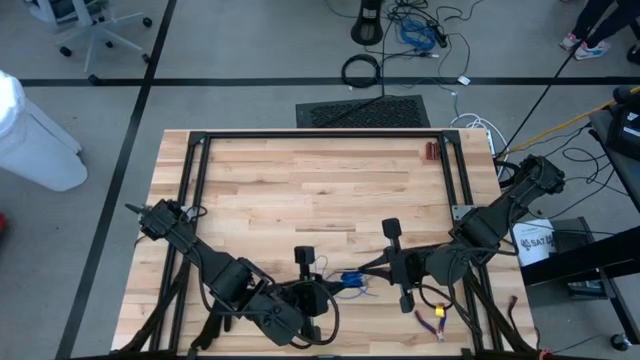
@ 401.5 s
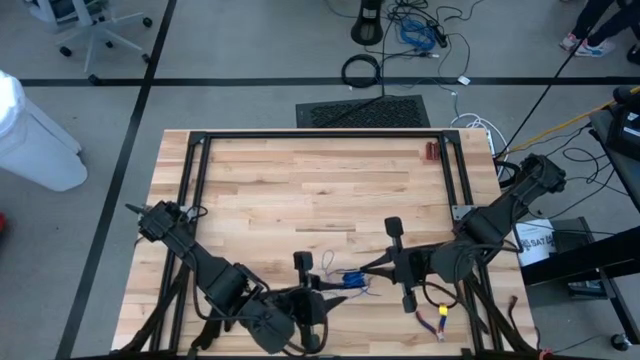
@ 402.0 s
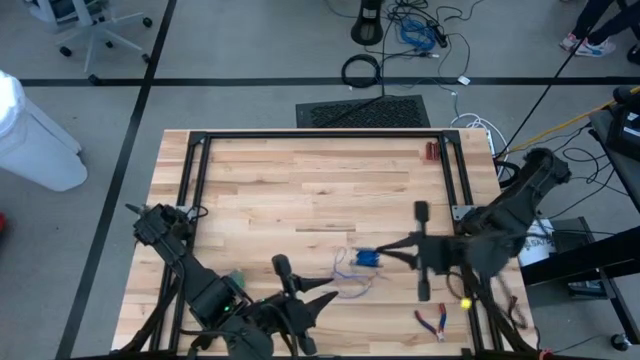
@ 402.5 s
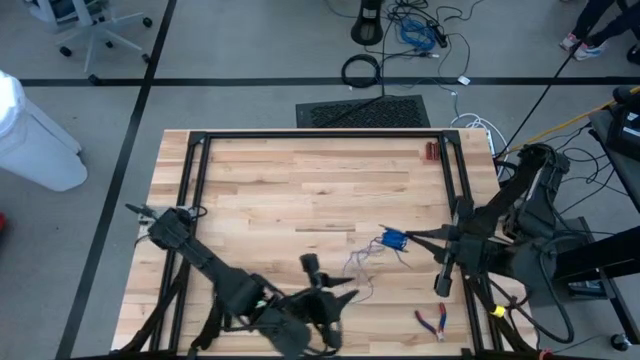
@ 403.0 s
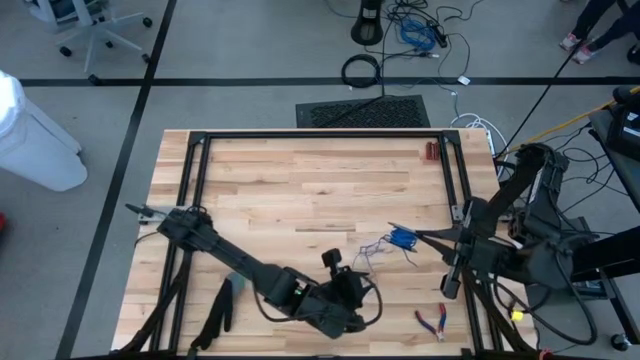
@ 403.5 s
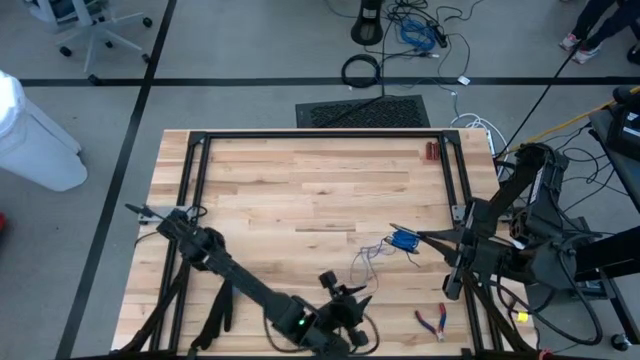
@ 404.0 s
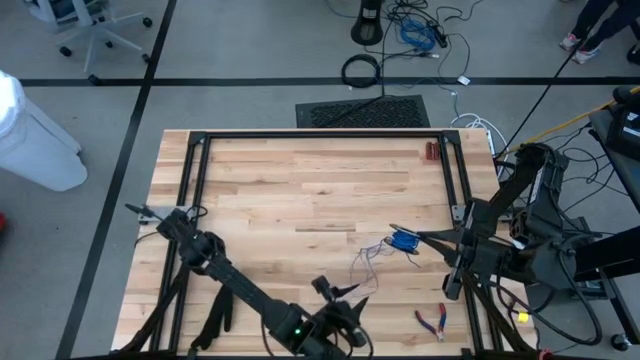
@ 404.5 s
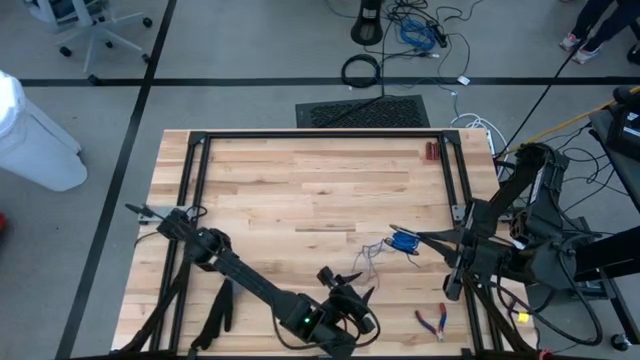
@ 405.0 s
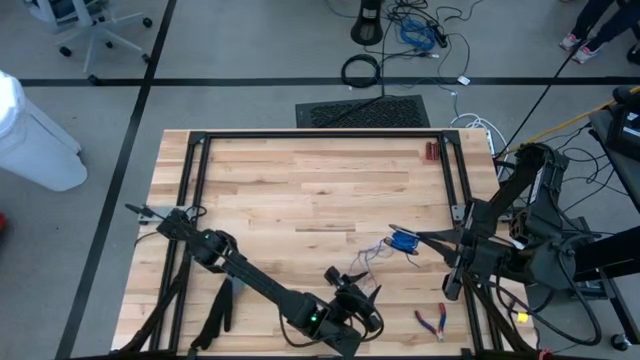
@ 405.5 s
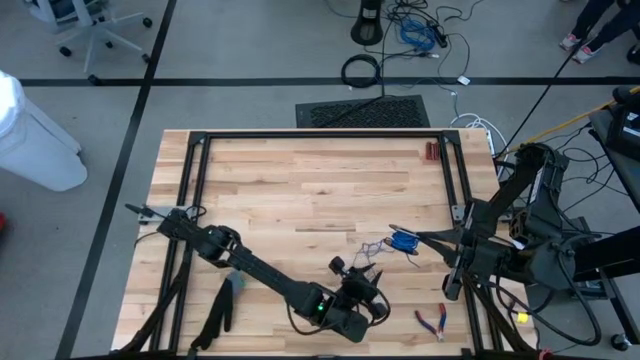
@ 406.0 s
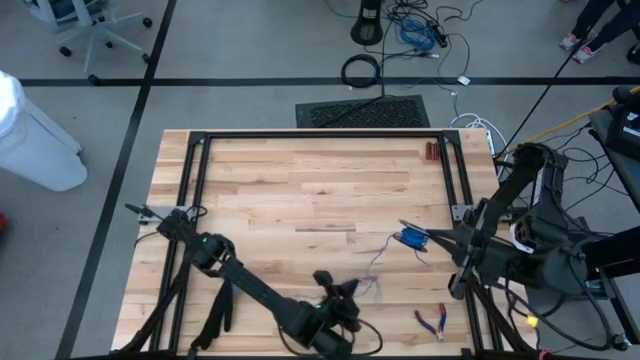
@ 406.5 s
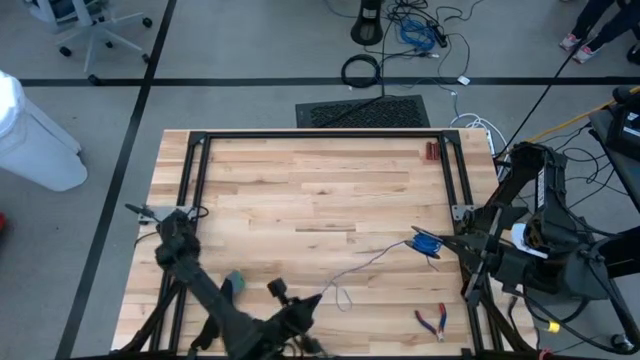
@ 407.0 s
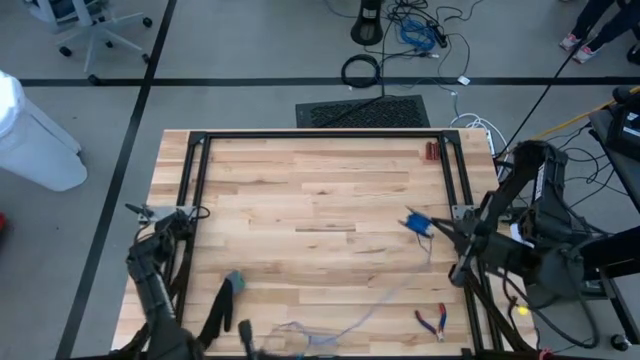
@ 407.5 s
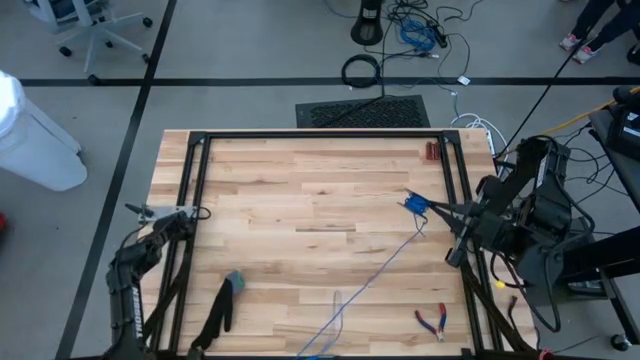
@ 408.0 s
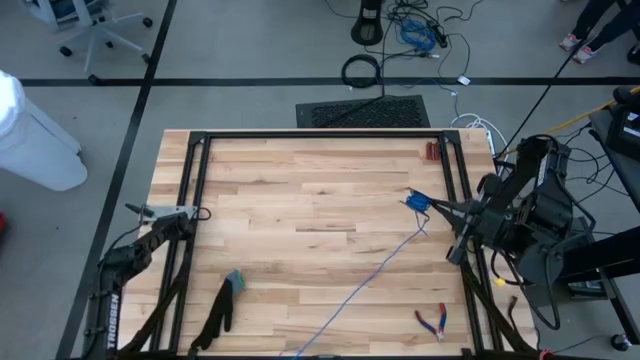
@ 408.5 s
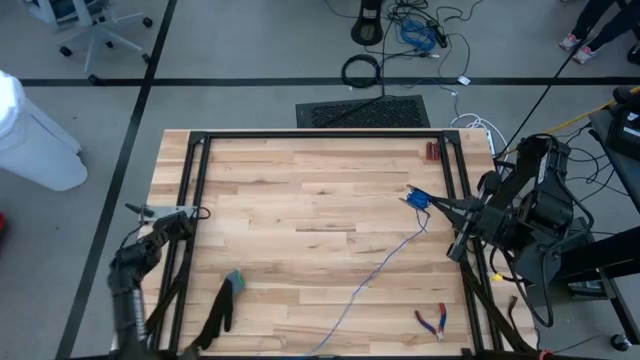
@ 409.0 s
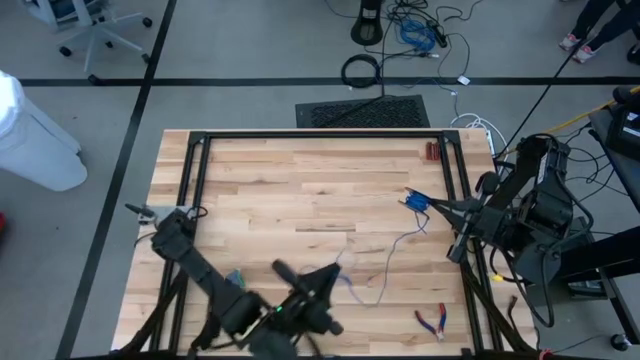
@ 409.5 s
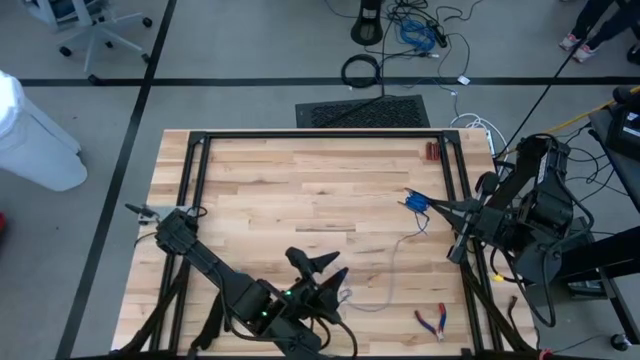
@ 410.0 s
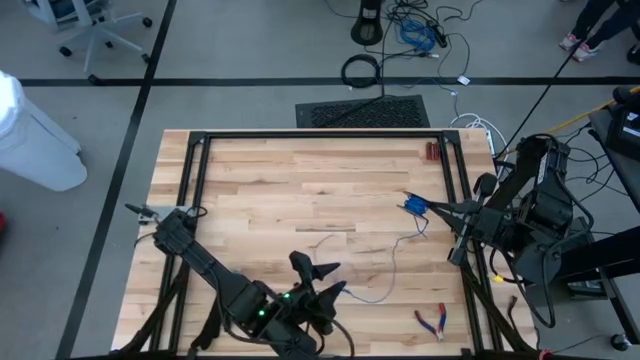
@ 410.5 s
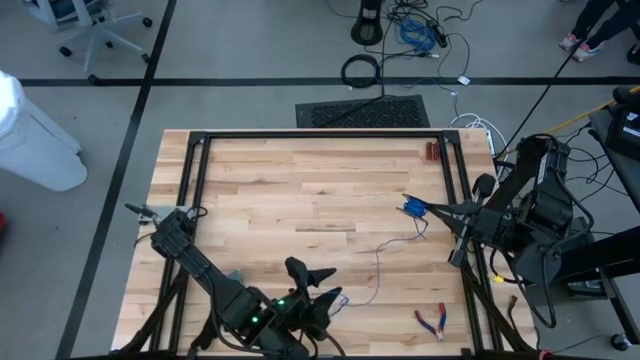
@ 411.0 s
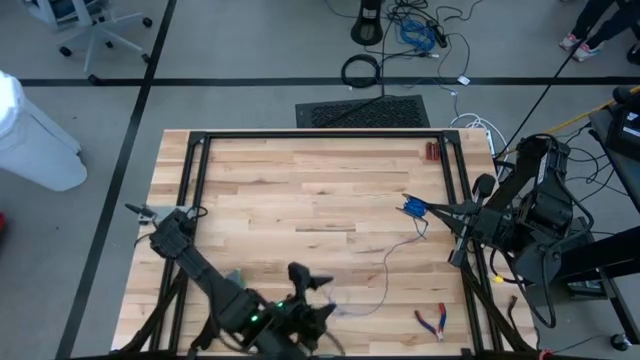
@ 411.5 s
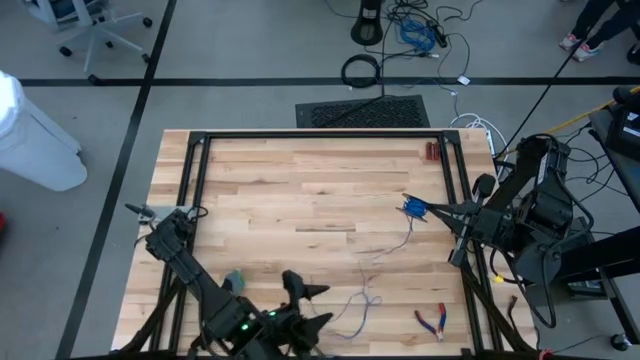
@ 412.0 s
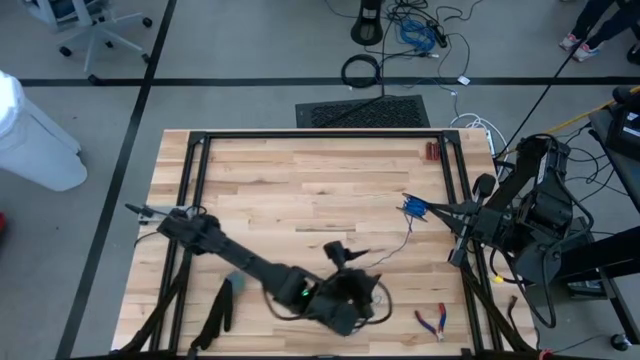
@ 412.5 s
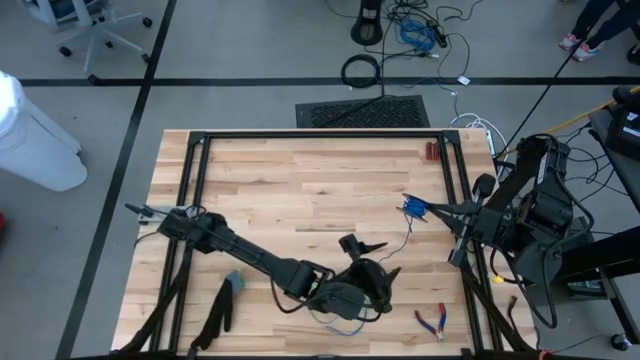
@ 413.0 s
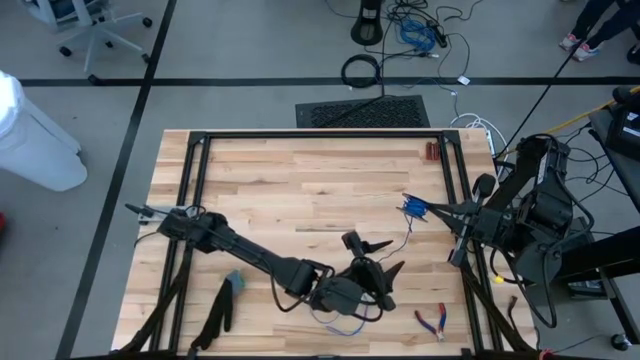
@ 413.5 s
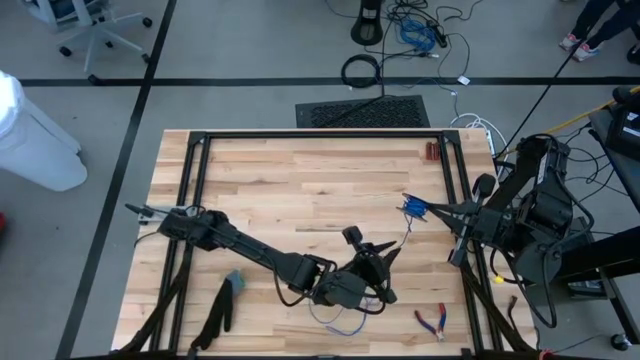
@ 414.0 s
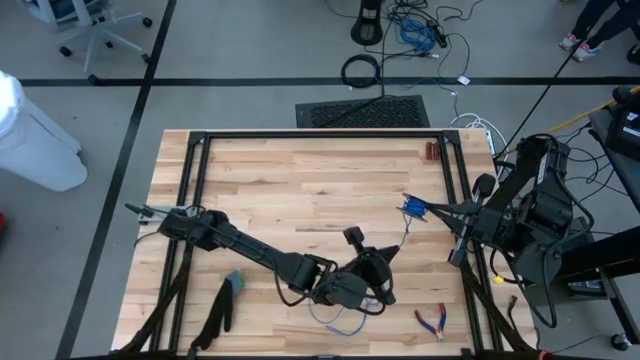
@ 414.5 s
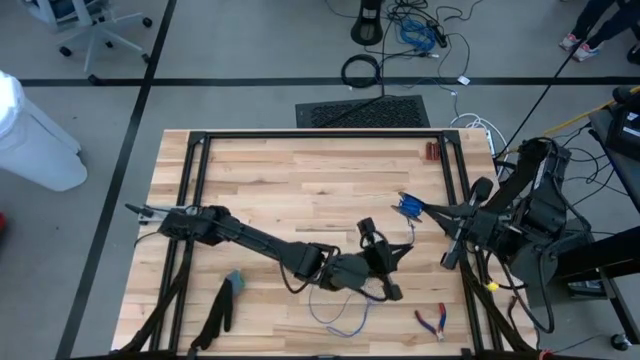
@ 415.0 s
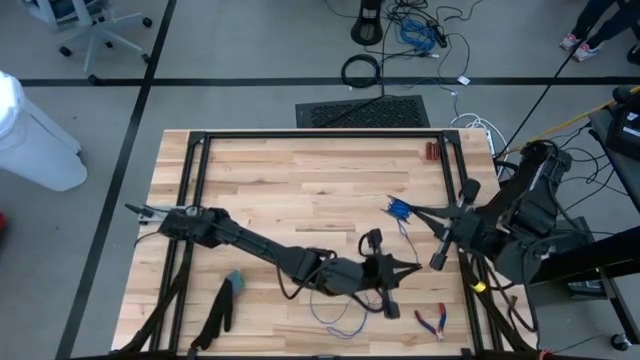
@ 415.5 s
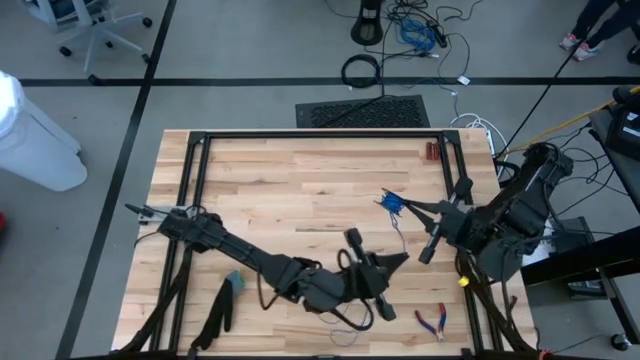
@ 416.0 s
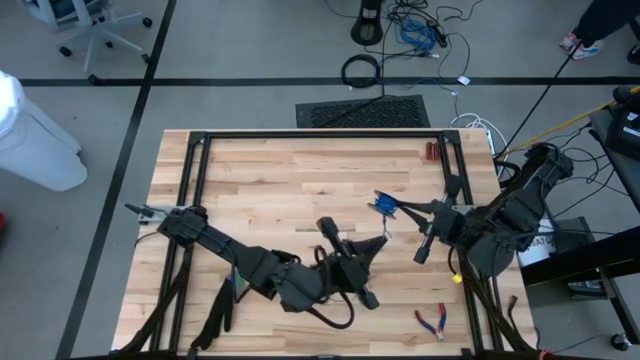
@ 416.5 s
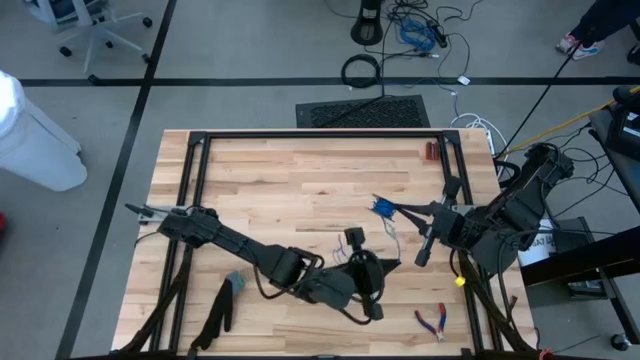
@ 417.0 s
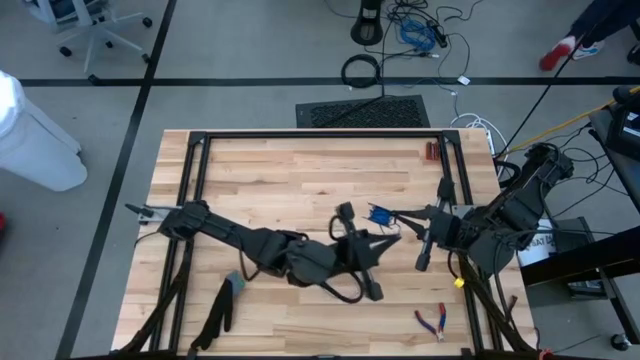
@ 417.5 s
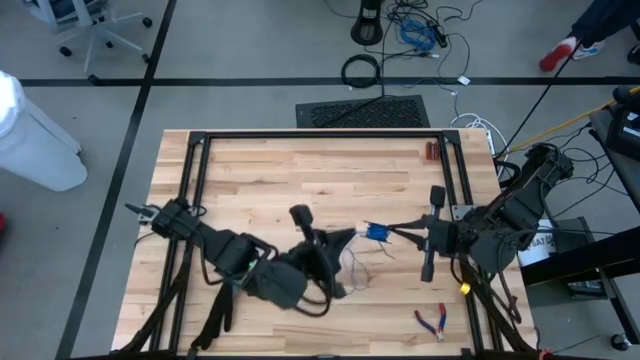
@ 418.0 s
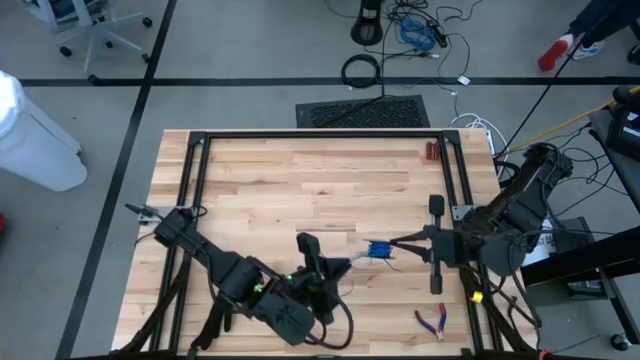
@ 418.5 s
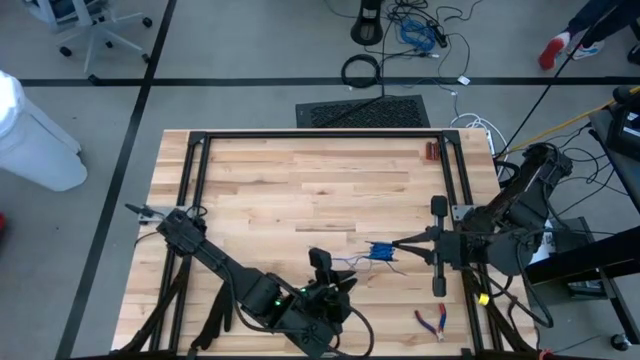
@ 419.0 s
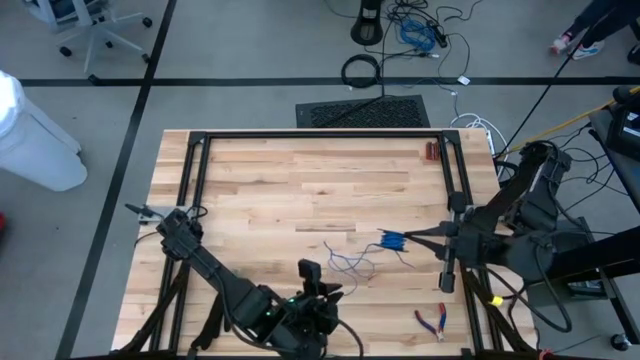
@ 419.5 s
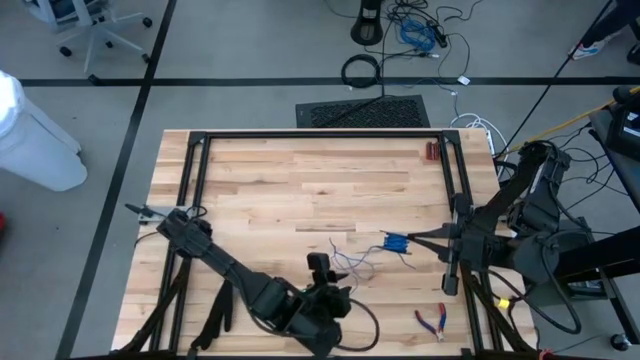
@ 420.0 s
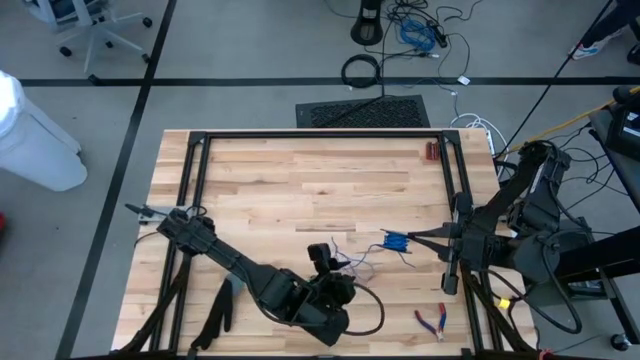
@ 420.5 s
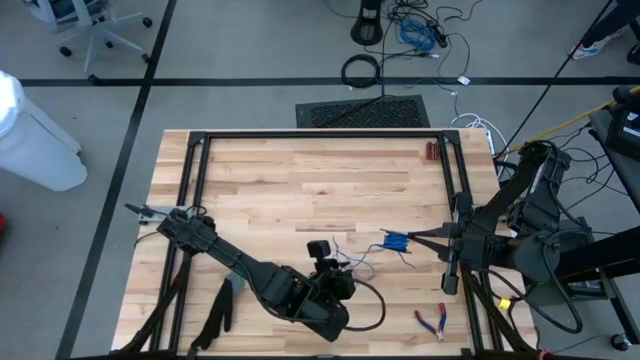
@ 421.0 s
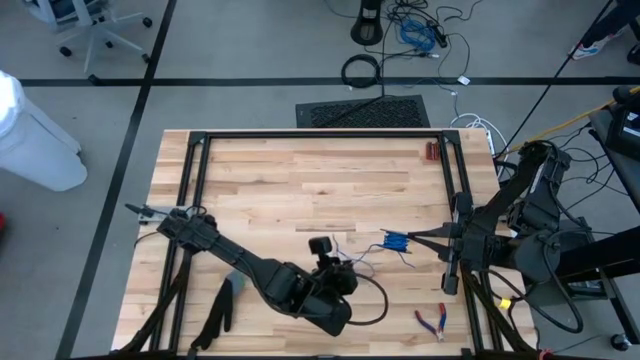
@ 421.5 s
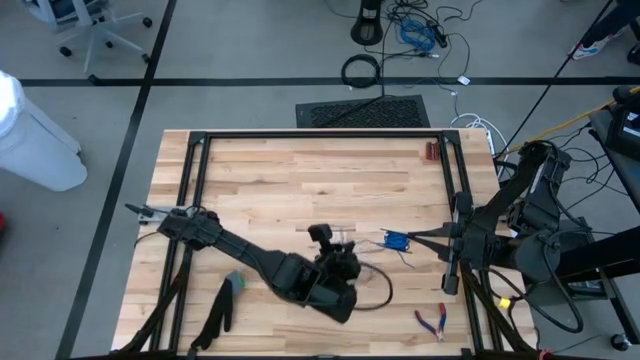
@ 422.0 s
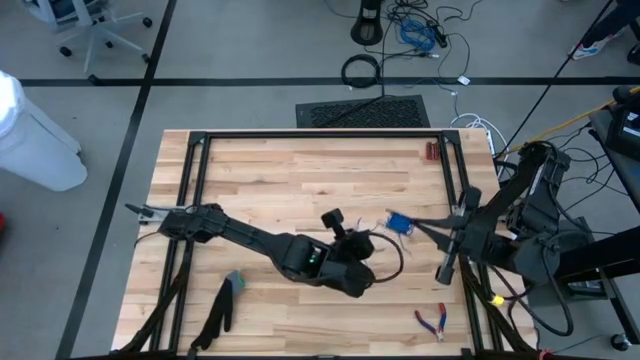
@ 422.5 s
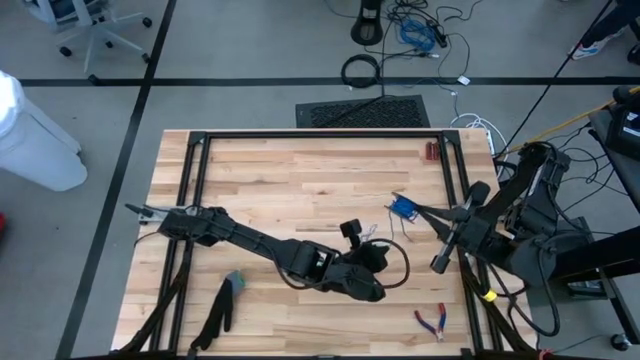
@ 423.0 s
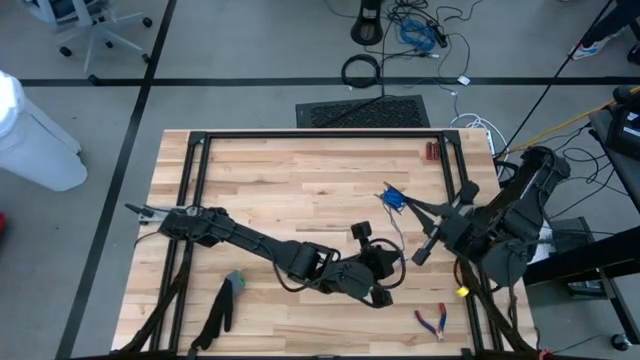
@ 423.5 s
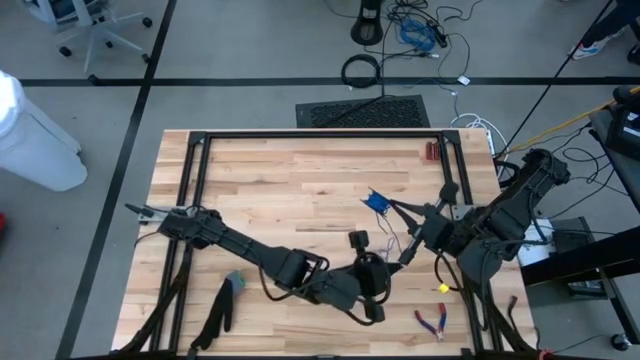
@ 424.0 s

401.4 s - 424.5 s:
Task: Coil cords
Coil the blue wire onto the black spool
